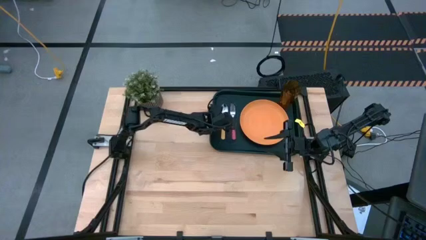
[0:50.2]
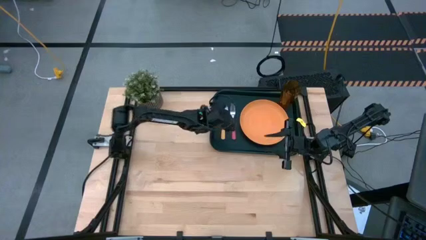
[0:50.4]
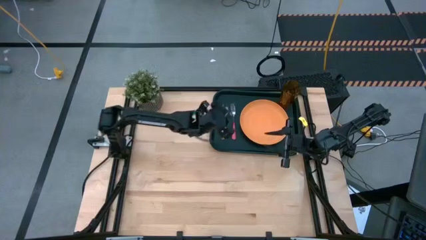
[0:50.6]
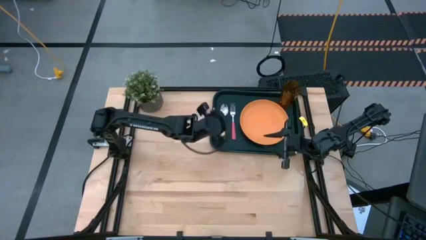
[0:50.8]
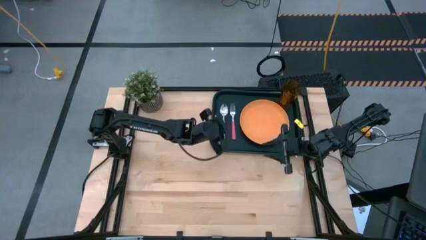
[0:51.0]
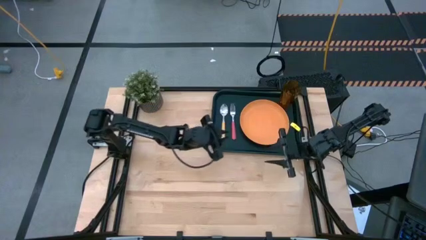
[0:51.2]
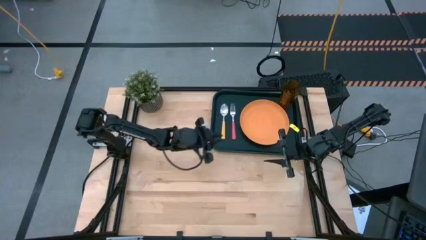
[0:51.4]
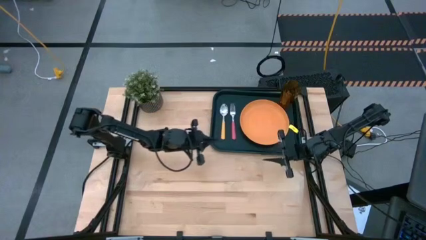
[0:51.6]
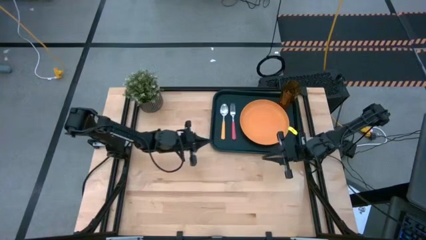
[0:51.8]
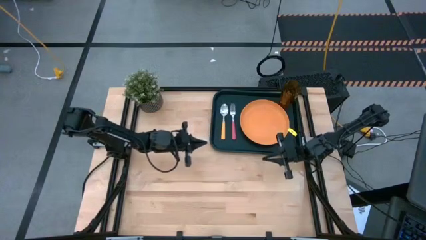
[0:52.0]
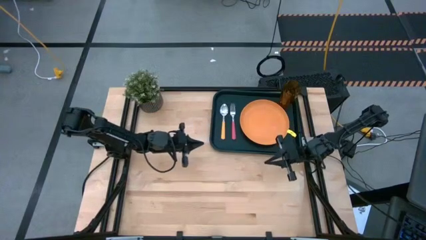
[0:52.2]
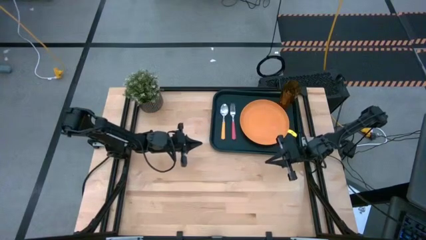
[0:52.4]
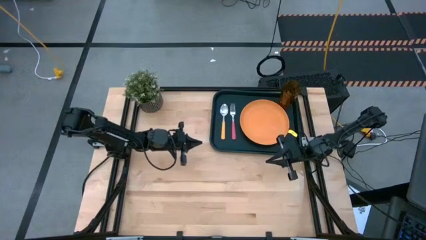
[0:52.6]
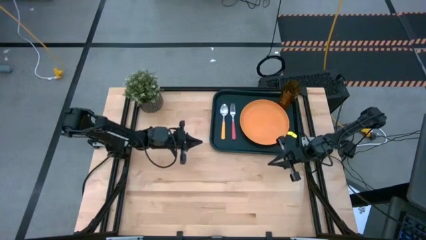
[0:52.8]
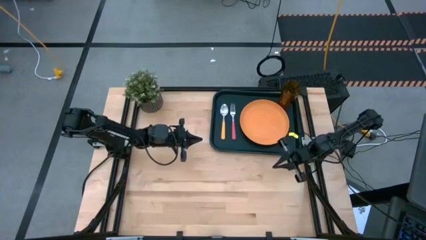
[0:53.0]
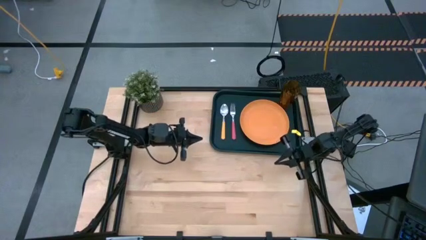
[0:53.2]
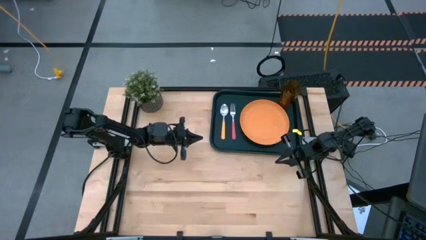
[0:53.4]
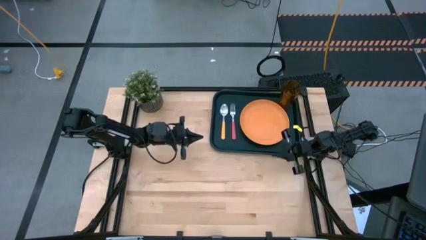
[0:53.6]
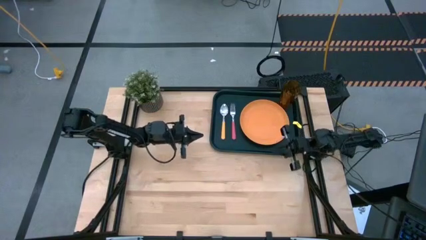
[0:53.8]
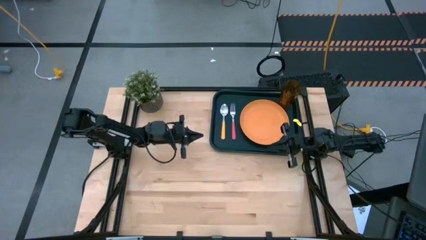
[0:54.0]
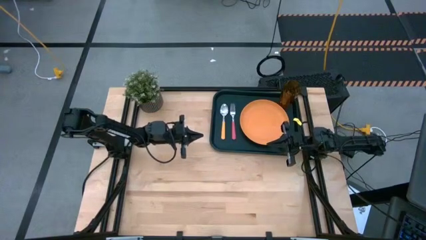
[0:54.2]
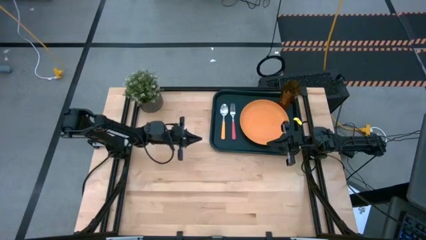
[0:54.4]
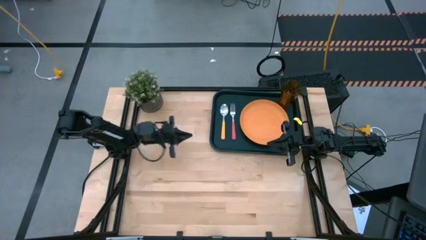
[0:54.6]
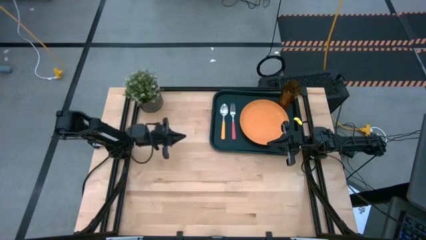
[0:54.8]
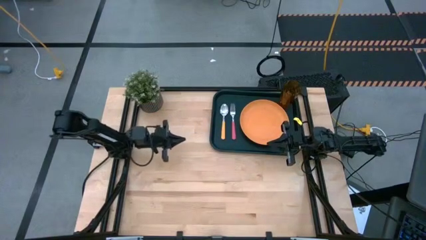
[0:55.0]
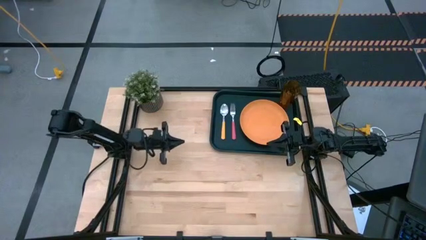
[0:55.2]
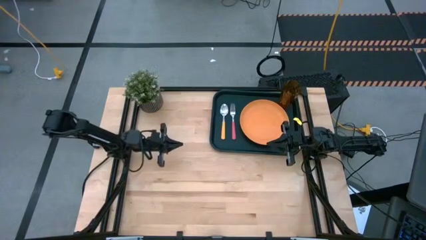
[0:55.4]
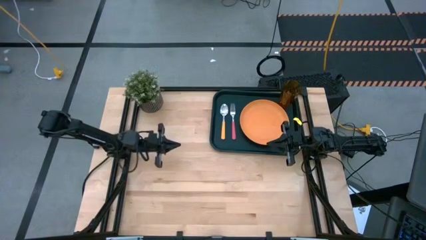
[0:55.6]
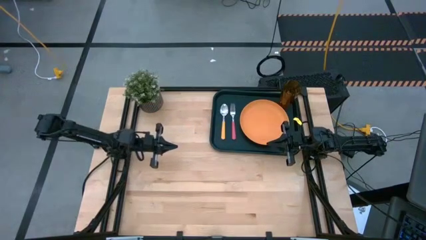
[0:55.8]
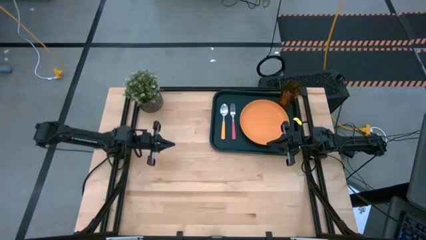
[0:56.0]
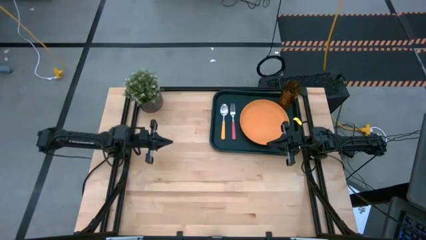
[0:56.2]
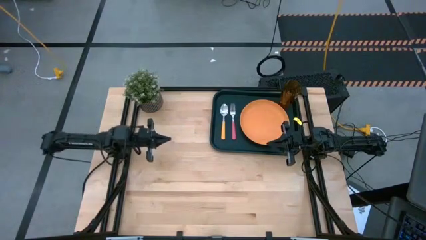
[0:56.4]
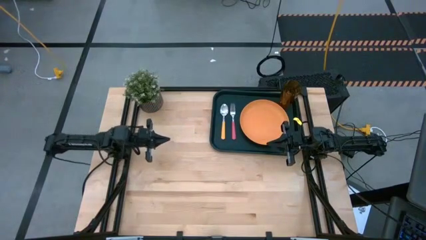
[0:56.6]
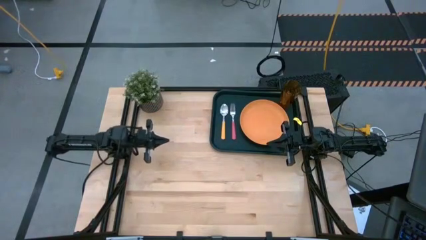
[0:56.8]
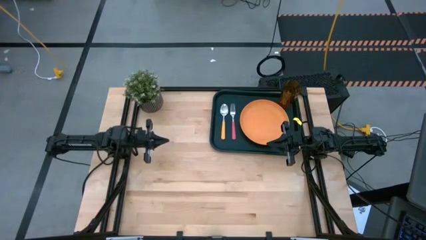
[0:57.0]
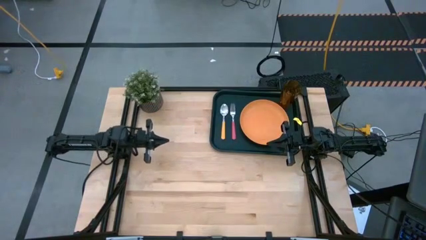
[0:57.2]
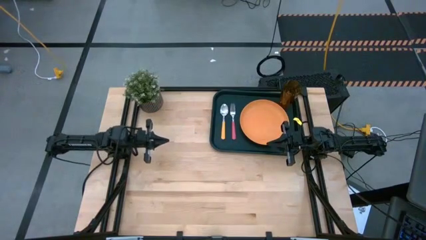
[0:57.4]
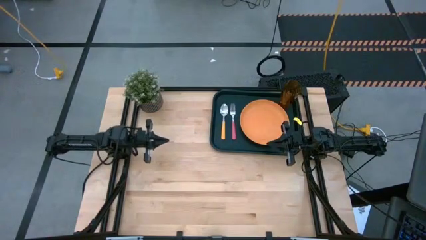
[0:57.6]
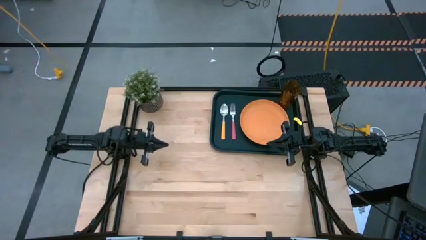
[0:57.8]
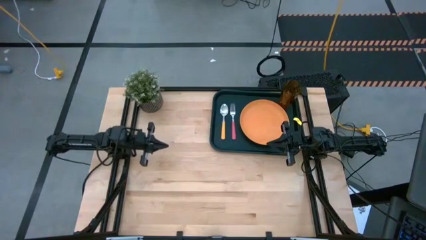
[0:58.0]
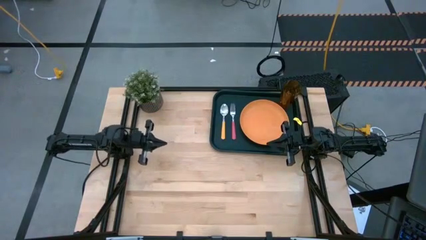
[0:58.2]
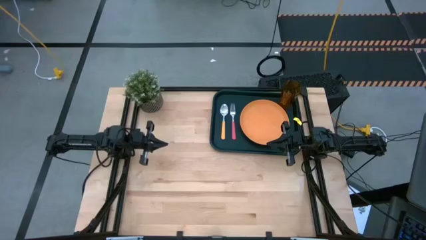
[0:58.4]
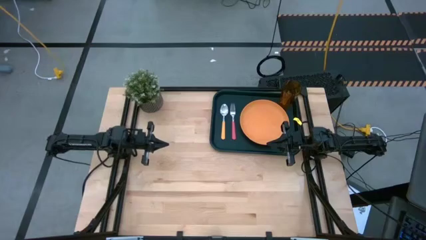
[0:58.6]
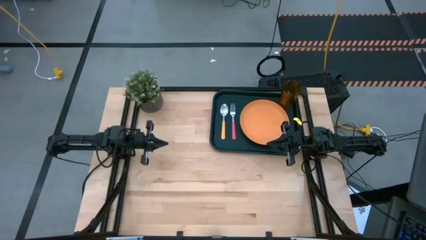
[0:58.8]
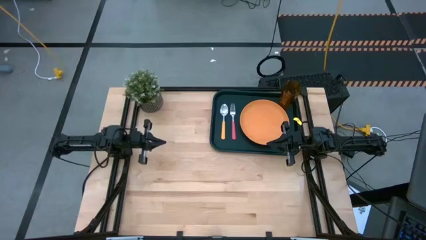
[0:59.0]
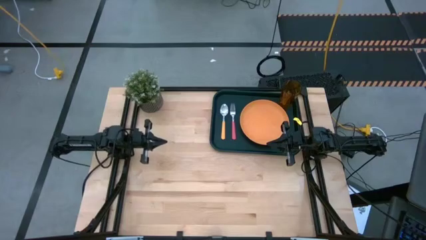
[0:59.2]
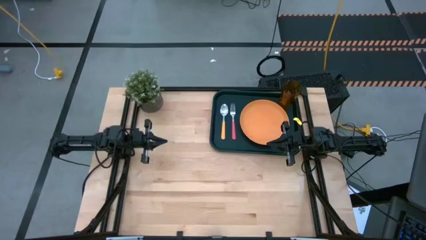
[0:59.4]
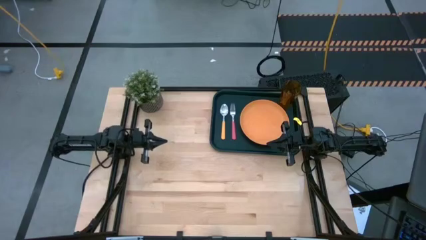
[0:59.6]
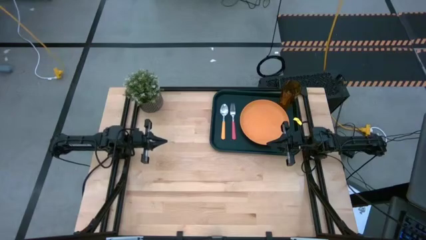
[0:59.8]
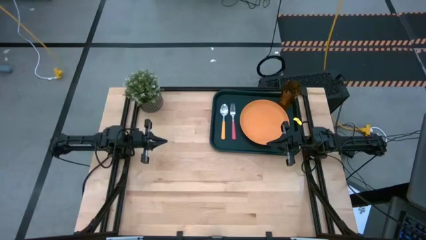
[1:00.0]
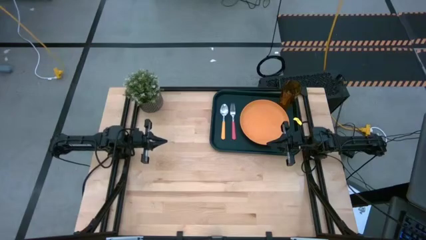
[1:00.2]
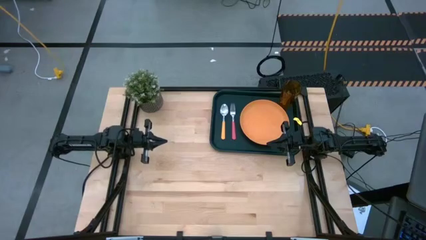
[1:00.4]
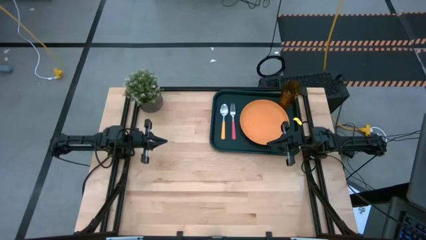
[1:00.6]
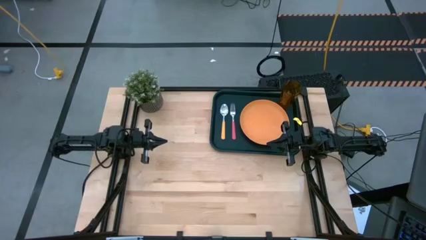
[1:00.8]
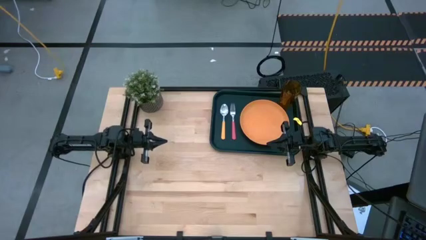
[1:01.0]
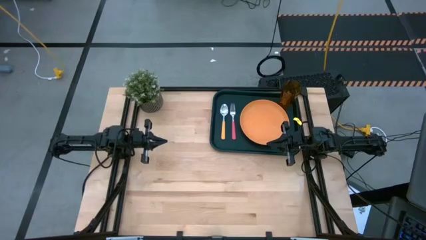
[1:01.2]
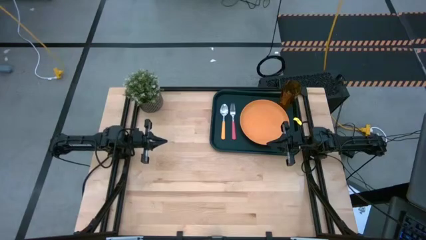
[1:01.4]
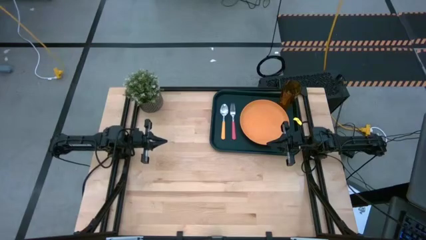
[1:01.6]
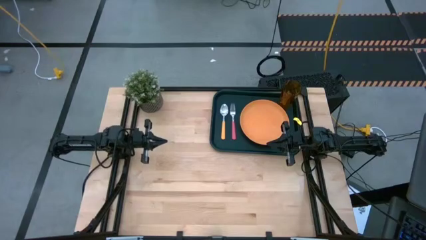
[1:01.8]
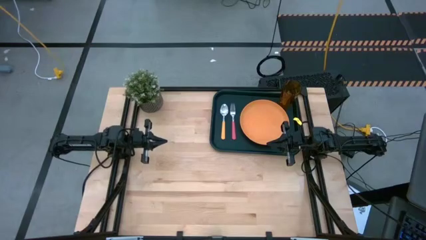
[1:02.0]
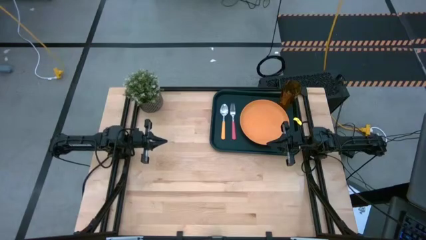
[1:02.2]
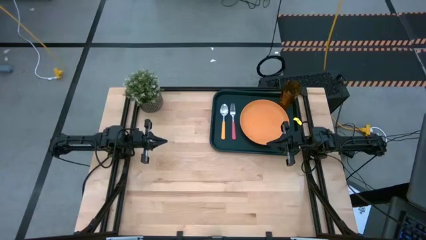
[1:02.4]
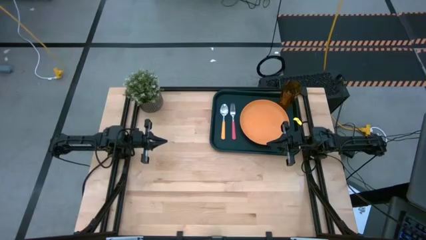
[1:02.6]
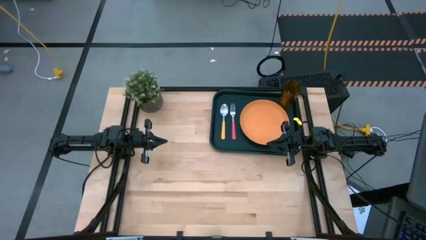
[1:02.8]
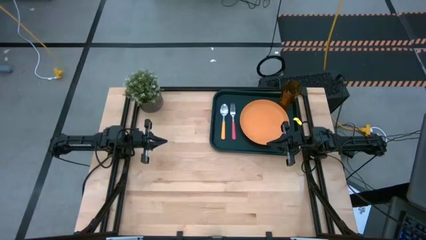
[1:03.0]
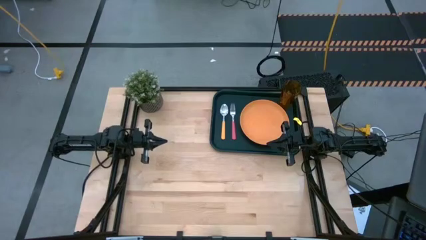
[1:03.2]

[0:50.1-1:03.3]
Task: Pick and place plate/cup/fork/spoon on tray
Return to Home Position
